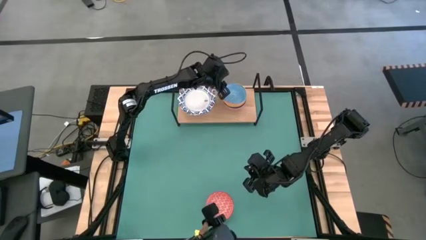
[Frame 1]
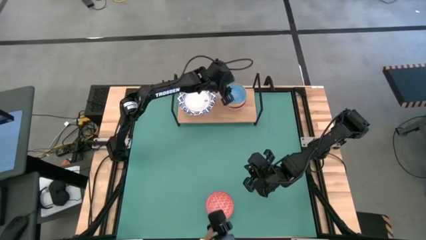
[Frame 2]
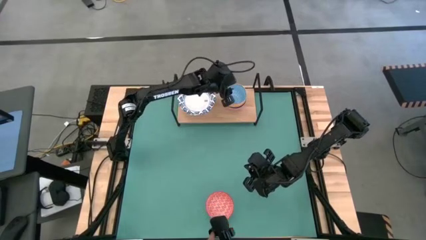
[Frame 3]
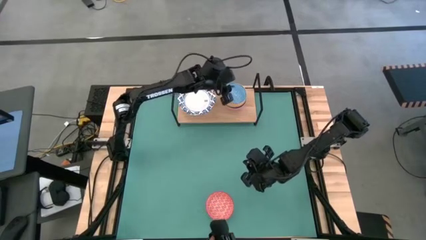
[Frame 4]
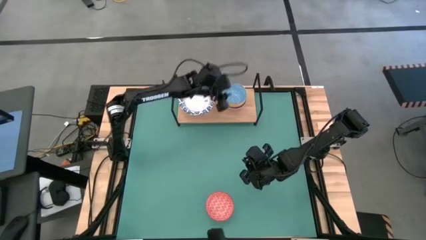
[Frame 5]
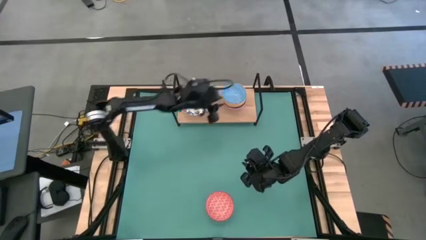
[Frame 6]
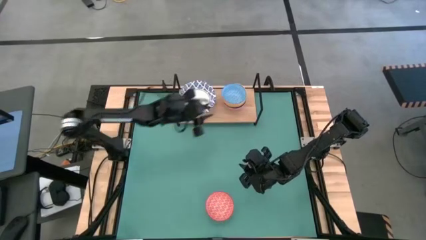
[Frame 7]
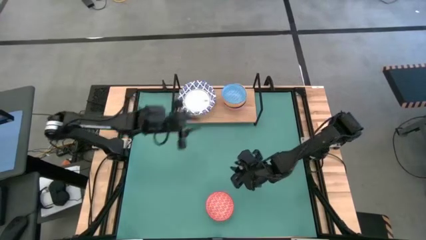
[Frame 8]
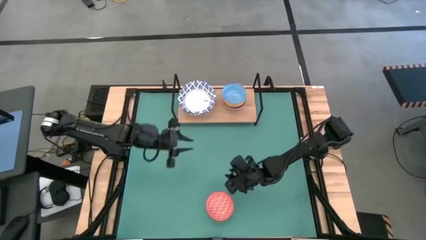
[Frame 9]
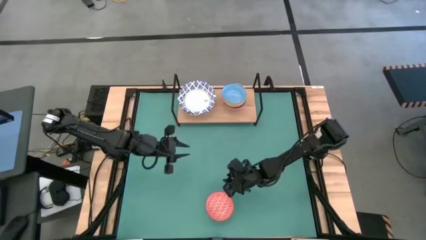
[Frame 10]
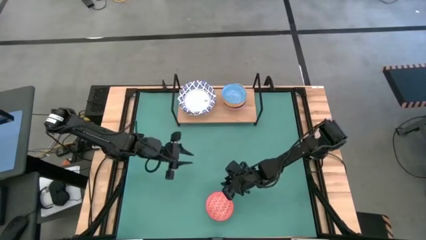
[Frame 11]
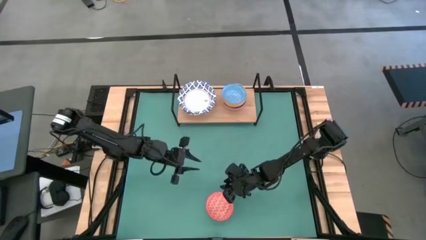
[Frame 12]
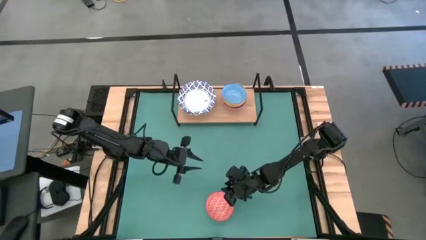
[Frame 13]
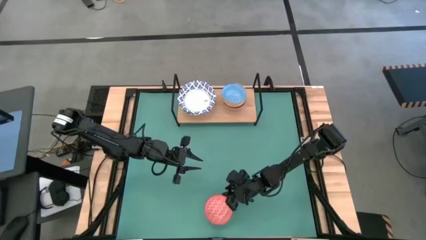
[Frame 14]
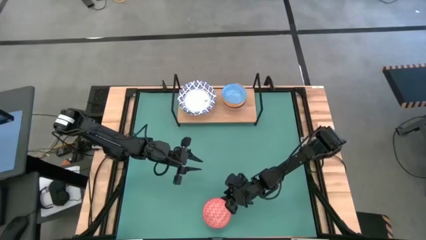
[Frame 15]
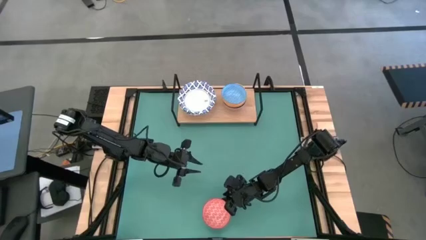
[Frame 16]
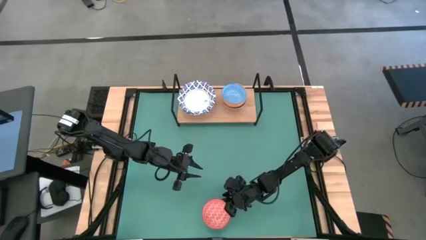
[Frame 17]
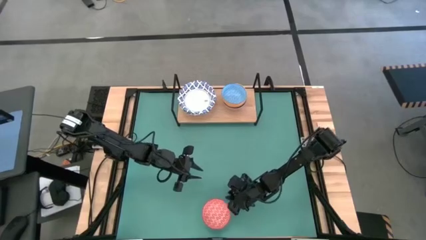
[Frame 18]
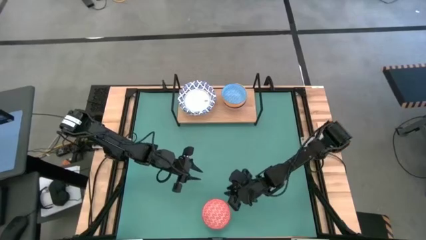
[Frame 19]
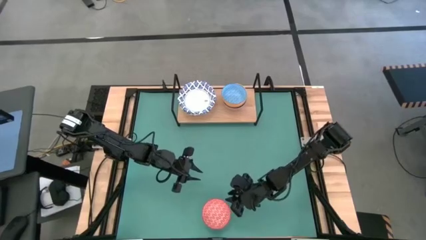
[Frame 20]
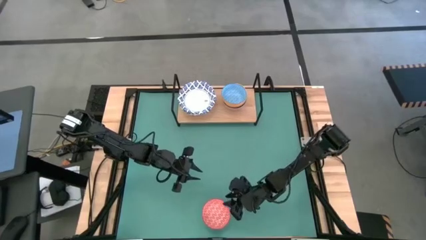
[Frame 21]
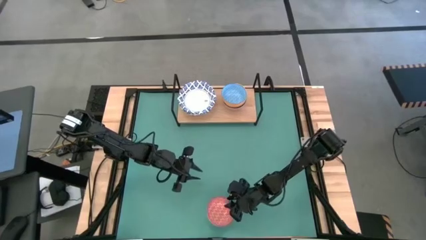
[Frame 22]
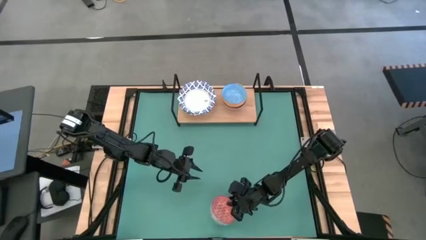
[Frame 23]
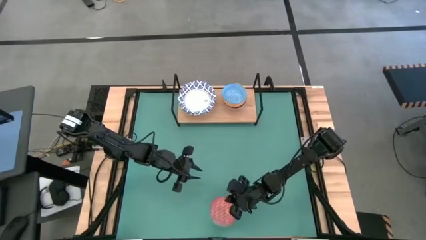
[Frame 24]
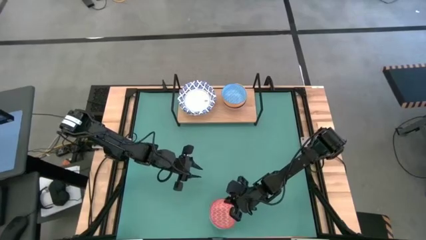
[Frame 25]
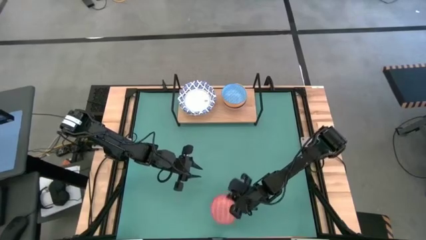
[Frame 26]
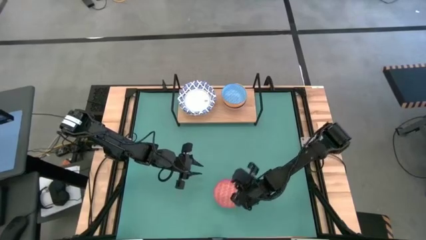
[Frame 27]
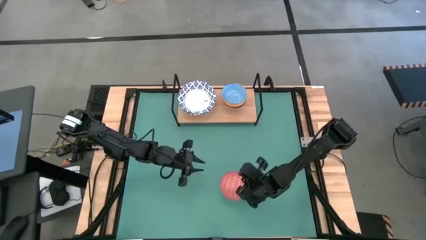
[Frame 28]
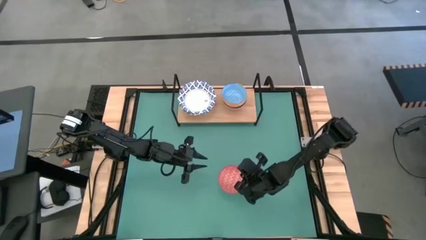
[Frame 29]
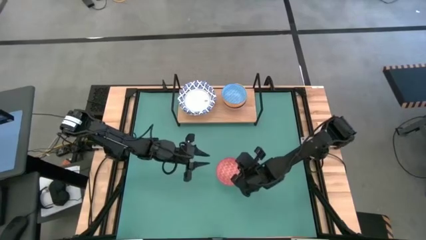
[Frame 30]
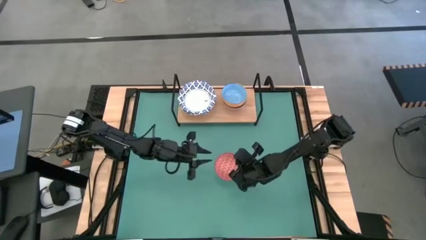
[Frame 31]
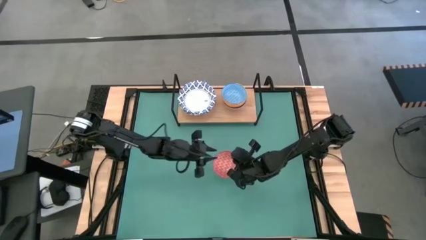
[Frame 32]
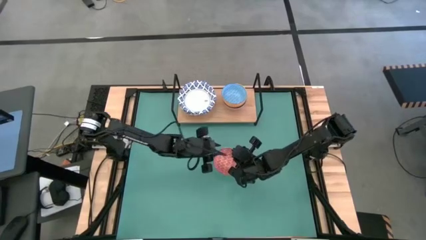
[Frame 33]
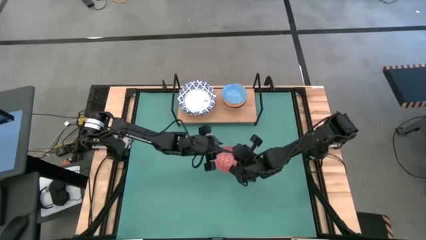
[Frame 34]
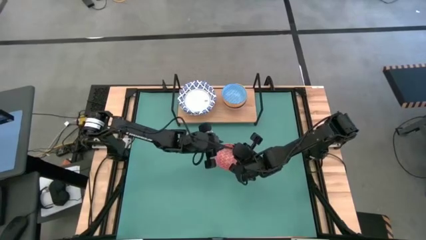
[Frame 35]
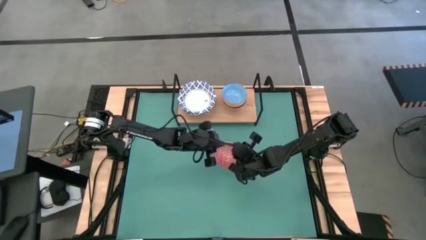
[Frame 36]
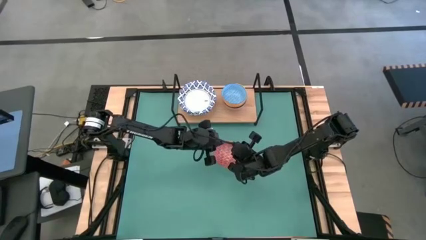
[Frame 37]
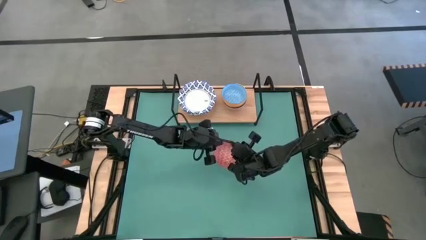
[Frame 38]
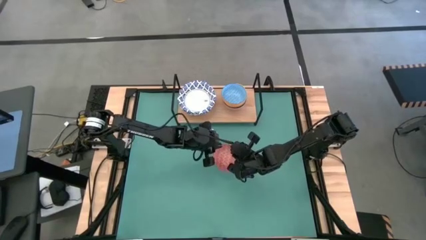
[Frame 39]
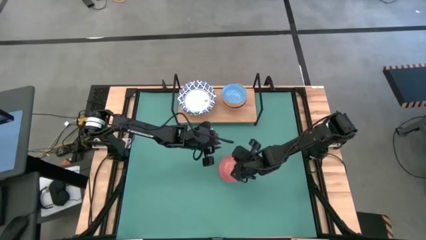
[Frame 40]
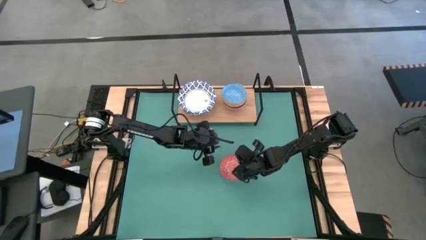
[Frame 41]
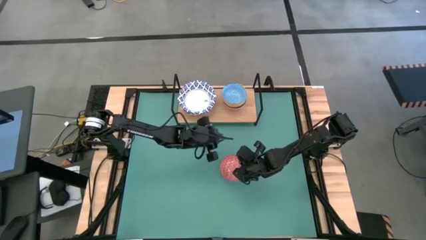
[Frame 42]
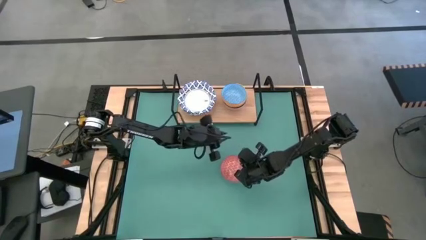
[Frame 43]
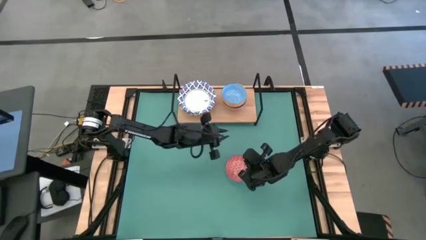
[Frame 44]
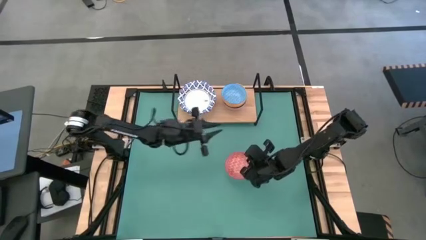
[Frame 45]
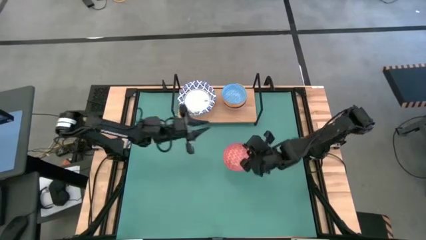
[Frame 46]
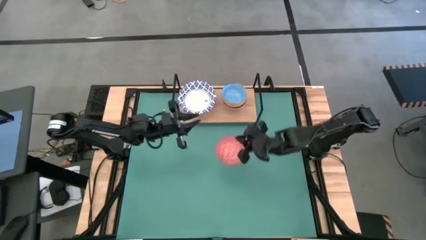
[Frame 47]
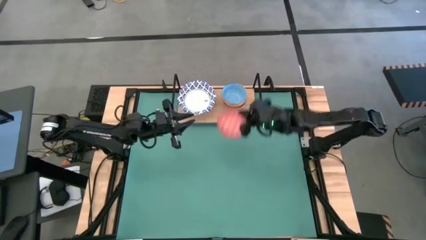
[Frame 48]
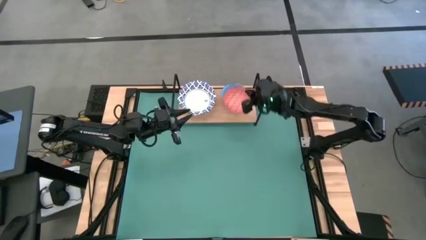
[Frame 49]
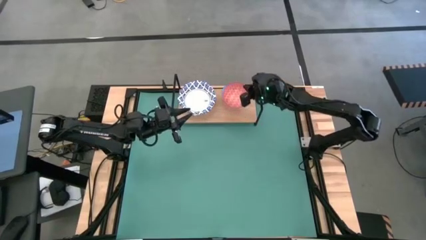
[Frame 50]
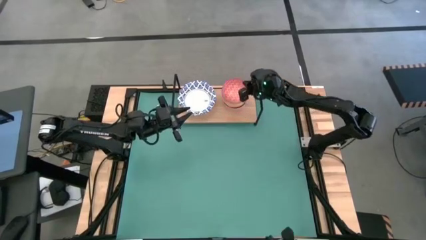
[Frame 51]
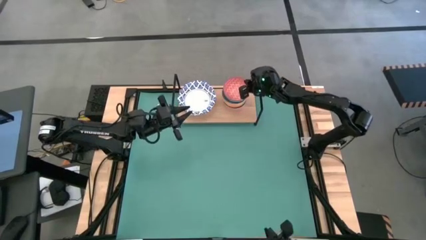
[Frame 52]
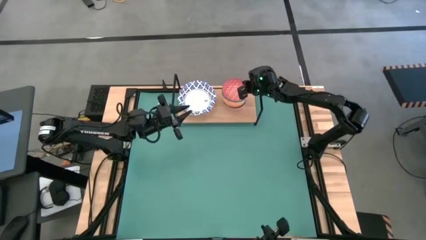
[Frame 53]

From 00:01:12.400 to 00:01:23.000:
Task: Place and stack bowls onto a shelf
Stack the red patterned bowl on top of the light blue patterned bowl on the shelf

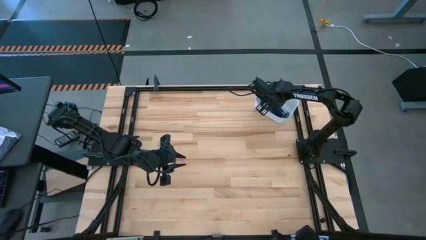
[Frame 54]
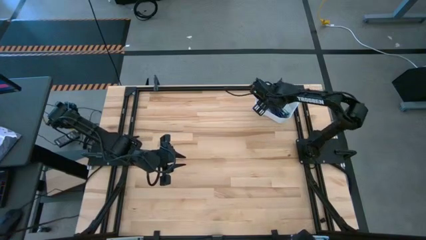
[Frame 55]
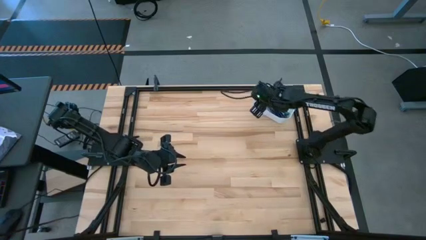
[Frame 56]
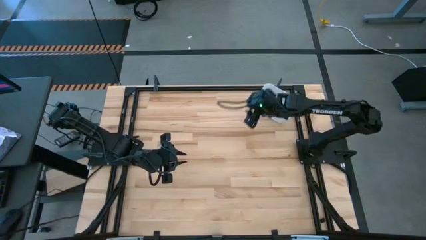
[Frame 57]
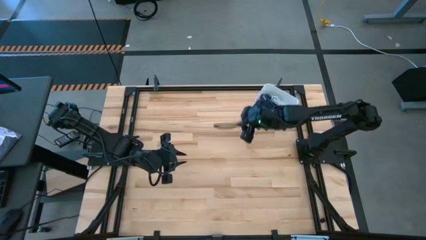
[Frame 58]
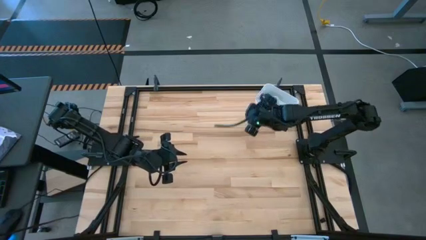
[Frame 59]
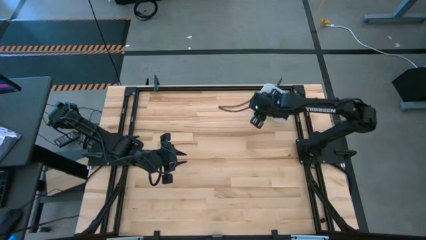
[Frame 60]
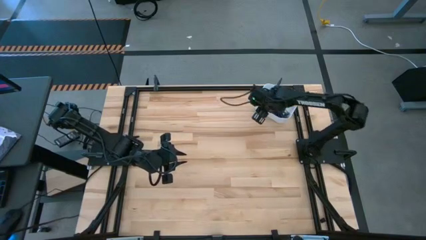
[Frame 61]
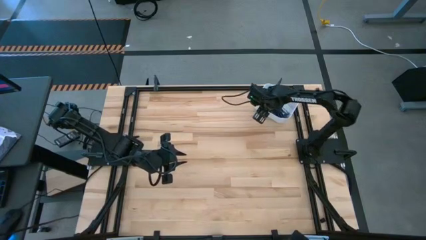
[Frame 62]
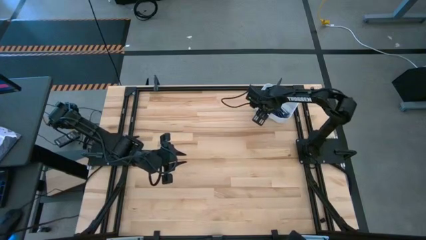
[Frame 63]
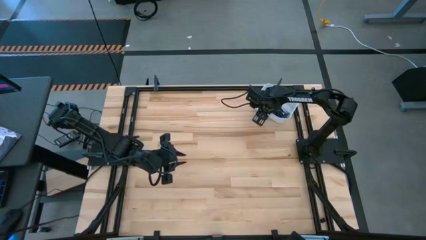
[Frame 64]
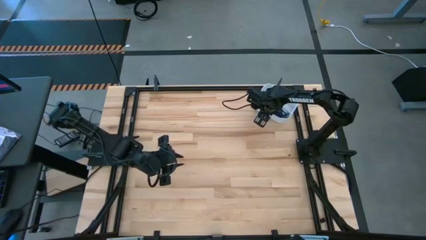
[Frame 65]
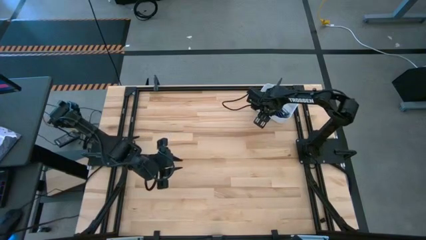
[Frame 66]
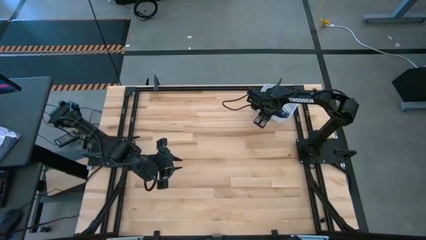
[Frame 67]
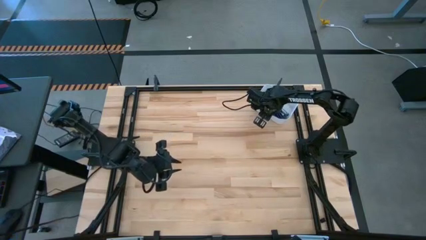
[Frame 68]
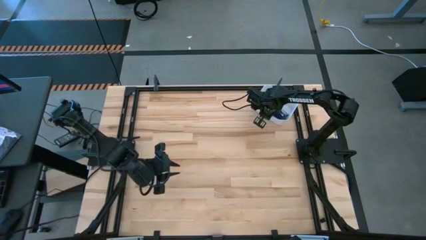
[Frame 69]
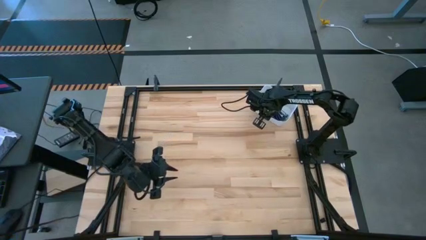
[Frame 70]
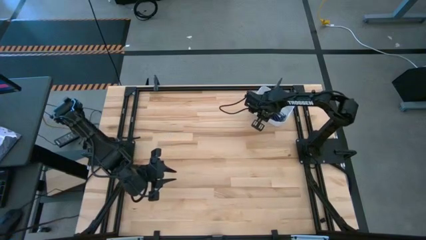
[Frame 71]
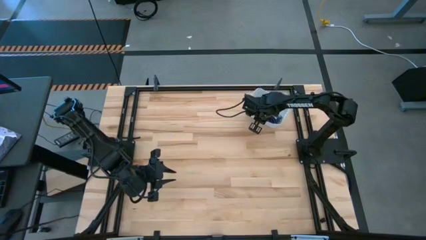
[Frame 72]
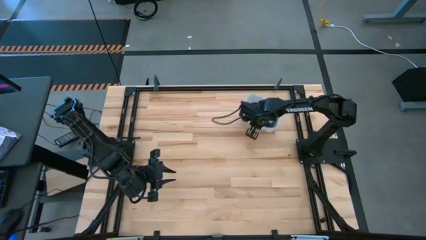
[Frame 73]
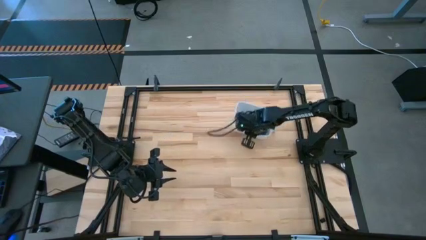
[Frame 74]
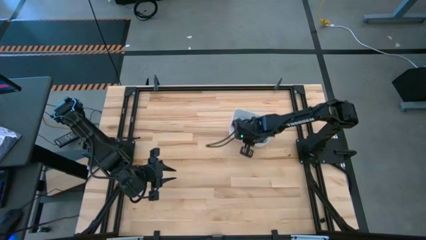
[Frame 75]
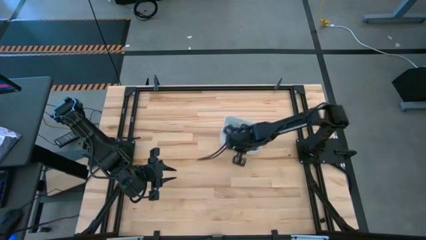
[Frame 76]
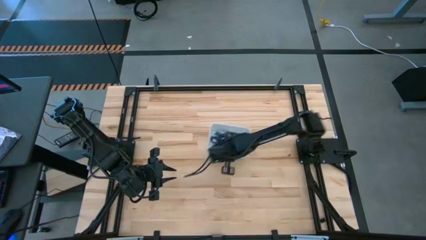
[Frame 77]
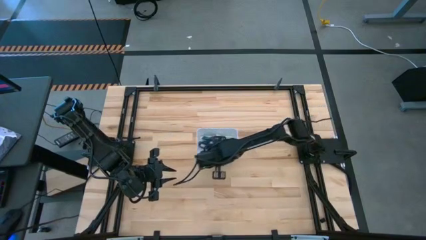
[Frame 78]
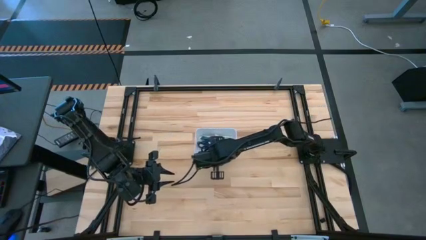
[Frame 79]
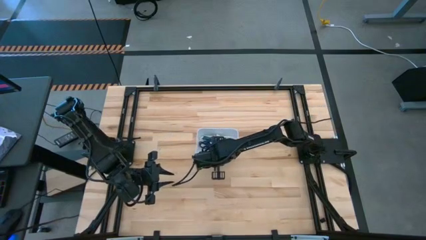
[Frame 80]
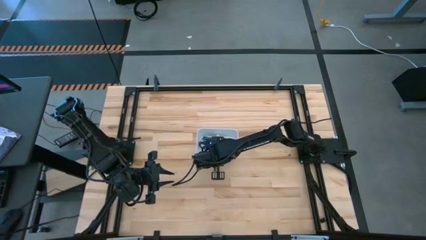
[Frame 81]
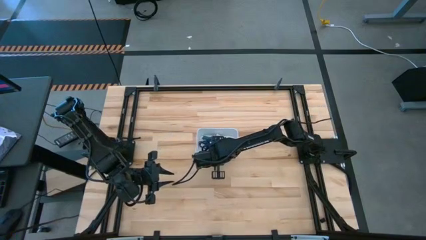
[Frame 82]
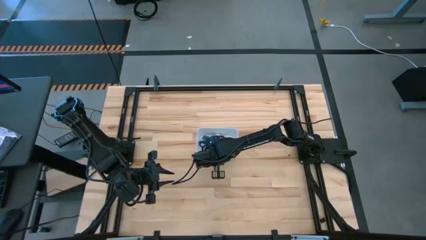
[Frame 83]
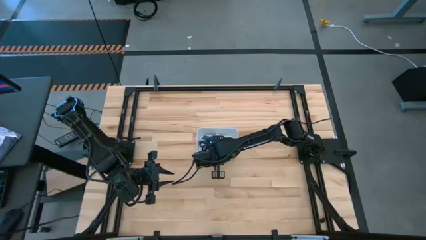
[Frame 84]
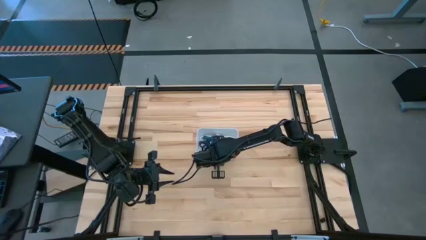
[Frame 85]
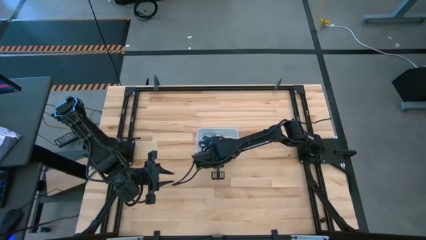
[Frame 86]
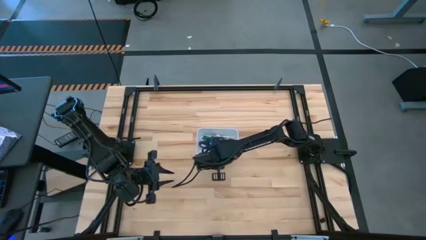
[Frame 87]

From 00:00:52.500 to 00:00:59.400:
Task: Pick and place USB-C Cables
Move the white bin to the center
